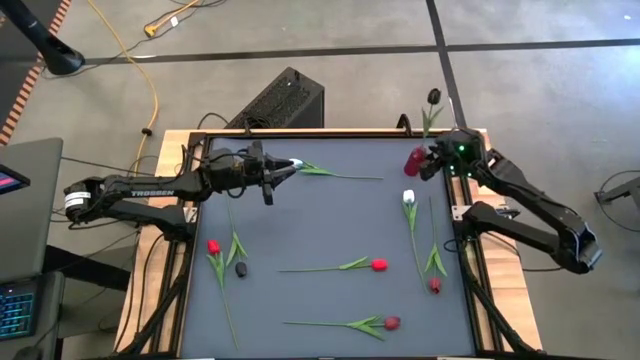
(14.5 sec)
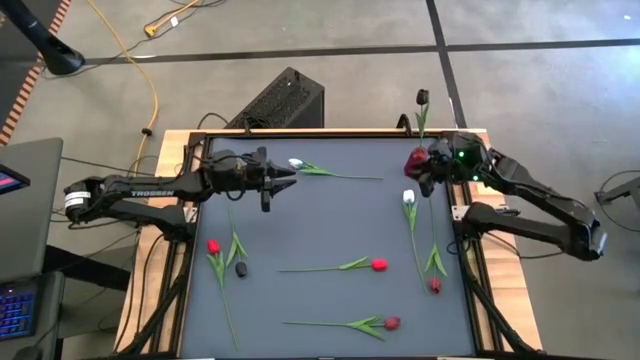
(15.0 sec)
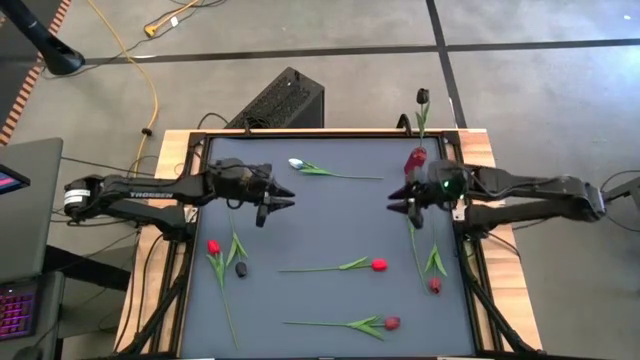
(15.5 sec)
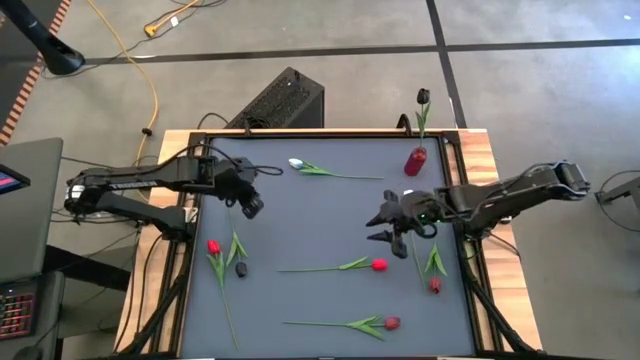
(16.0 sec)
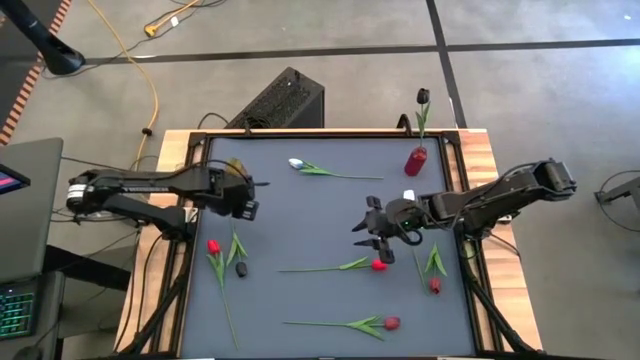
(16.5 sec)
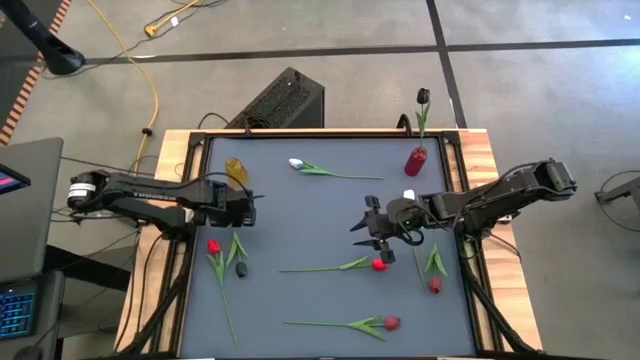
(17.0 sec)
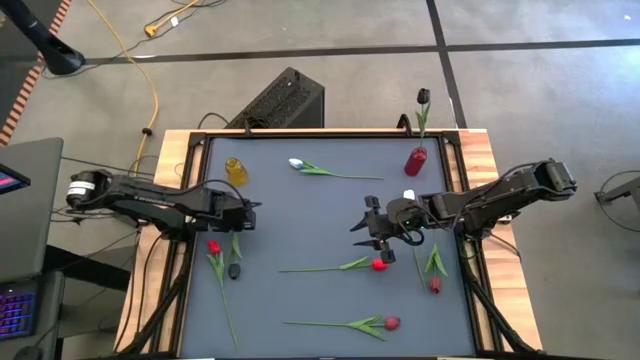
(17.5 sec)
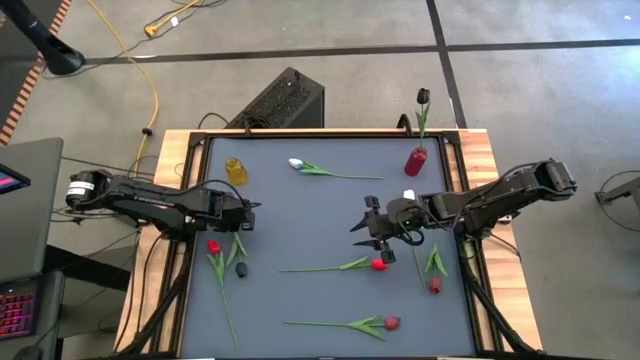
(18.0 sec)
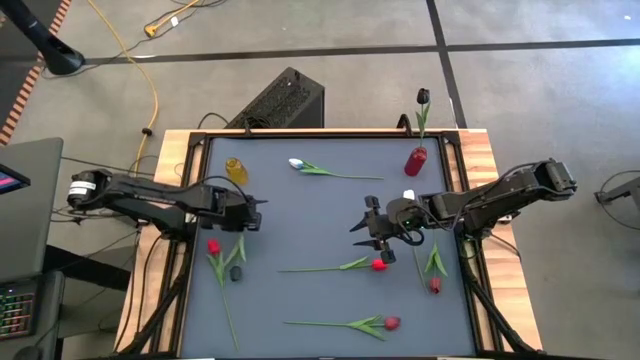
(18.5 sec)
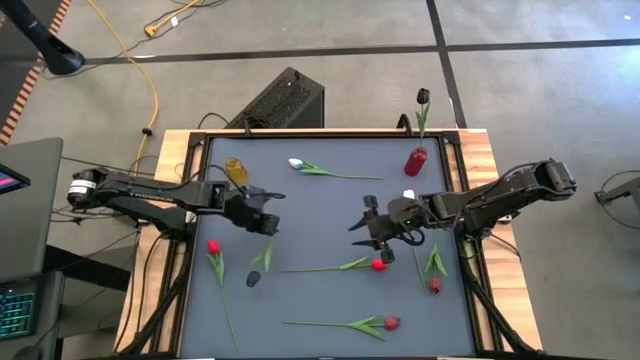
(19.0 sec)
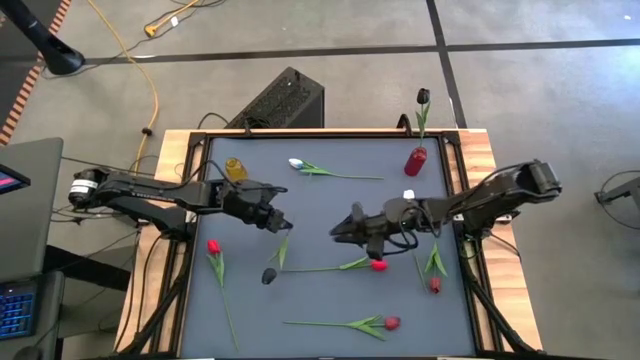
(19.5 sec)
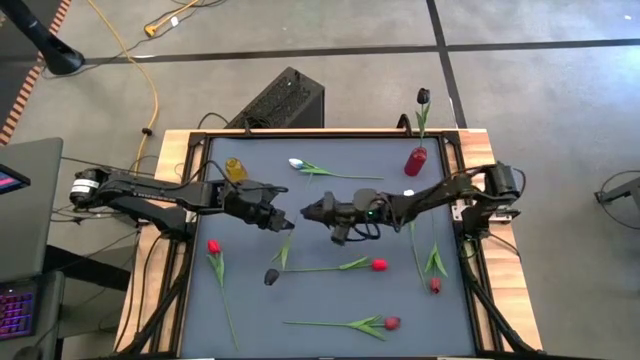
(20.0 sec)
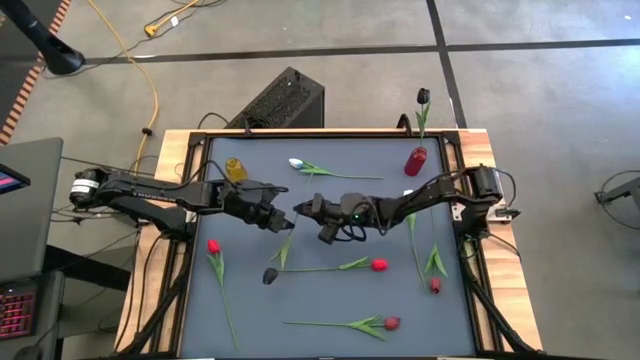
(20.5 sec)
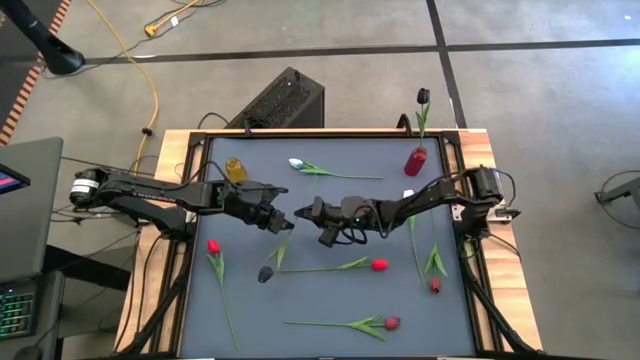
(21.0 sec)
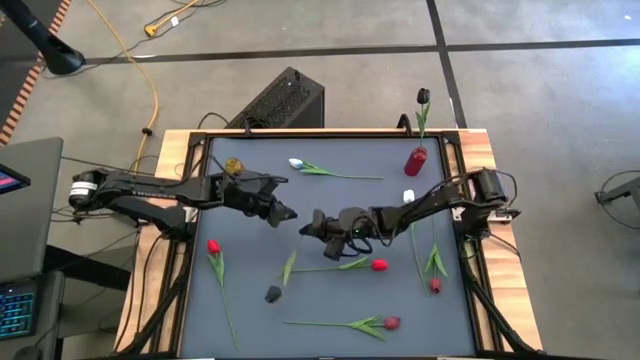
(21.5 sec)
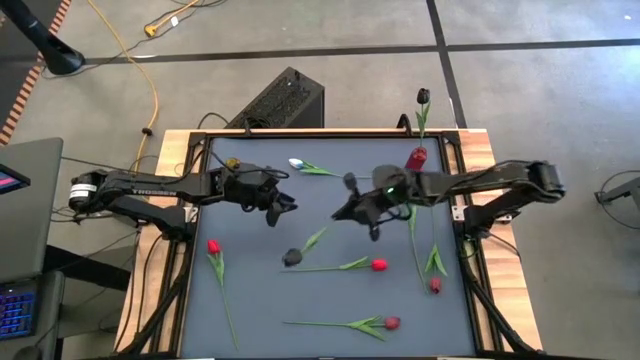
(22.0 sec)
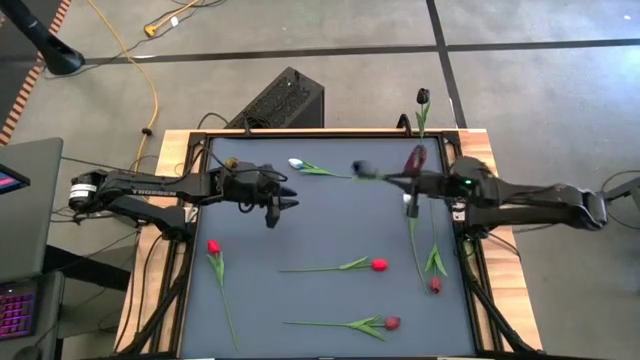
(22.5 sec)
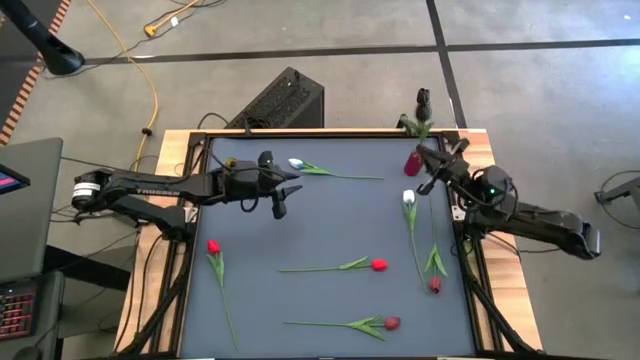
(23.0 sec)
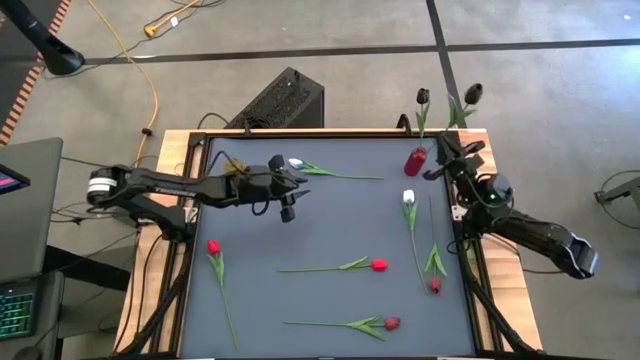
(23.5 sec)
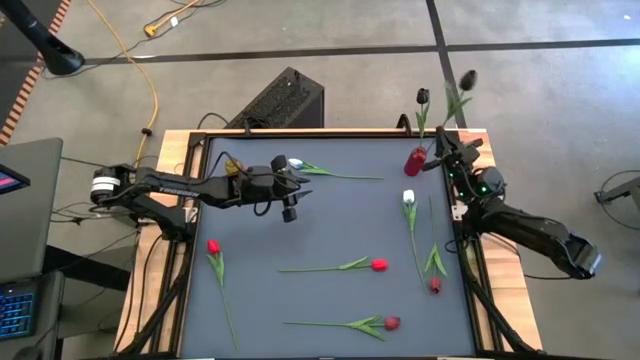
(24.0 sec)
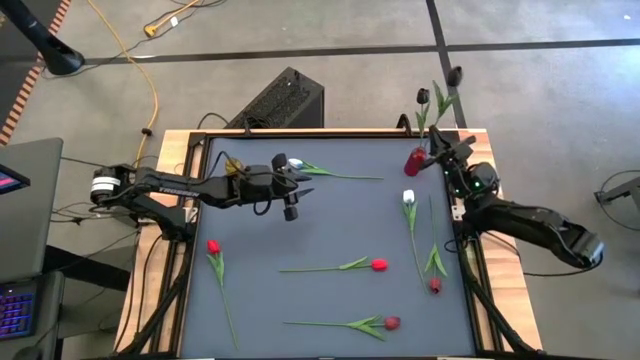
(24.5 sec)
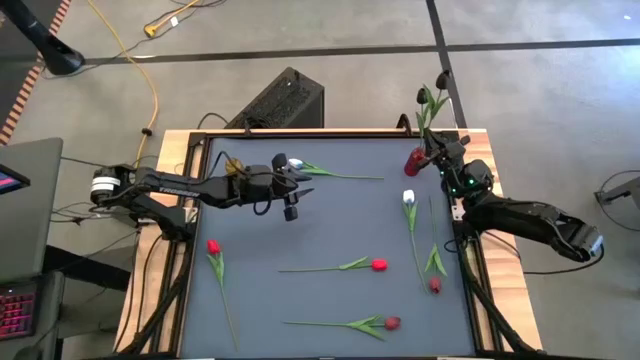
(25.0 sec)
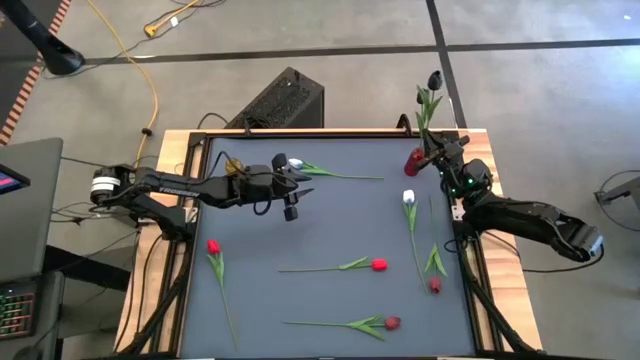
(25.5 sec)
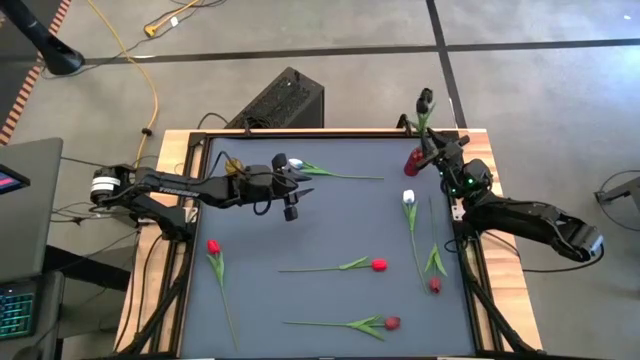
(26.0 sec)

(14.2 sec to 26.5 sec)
Task: Sort flowers into vase by color
Put the black tulip into the red flower vase

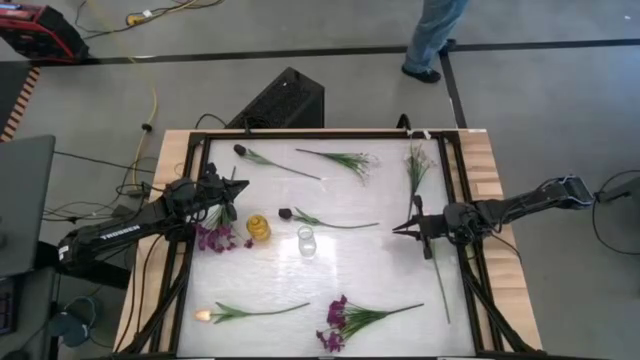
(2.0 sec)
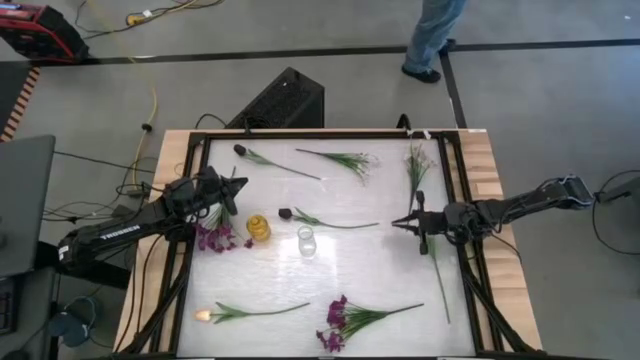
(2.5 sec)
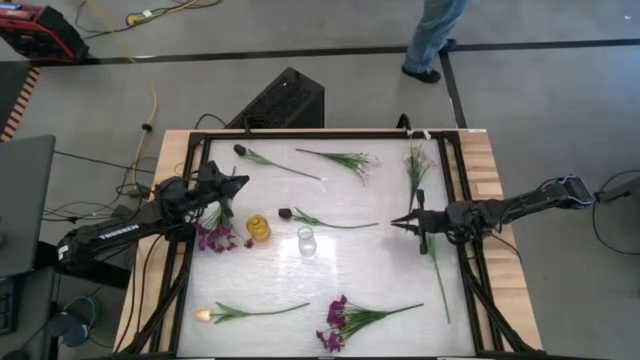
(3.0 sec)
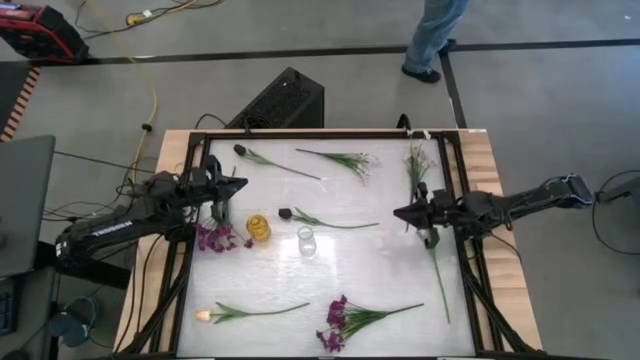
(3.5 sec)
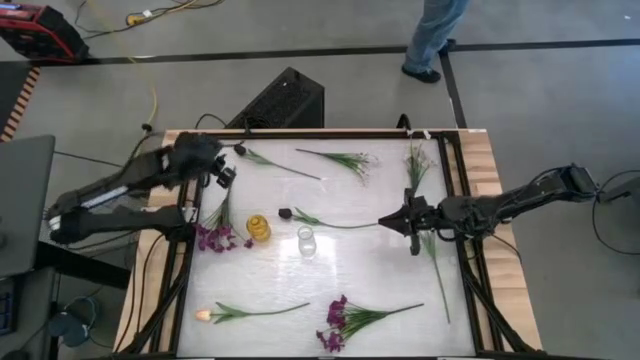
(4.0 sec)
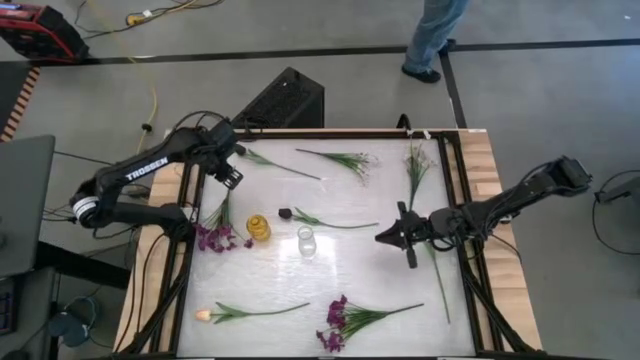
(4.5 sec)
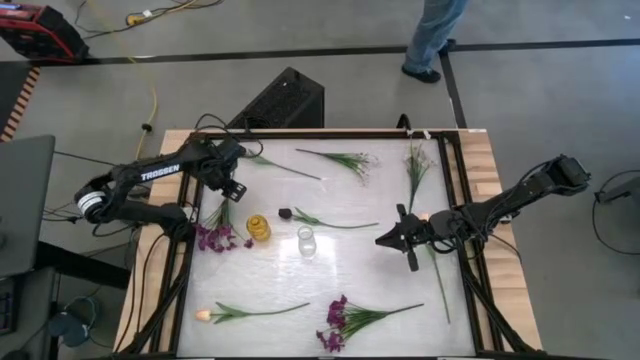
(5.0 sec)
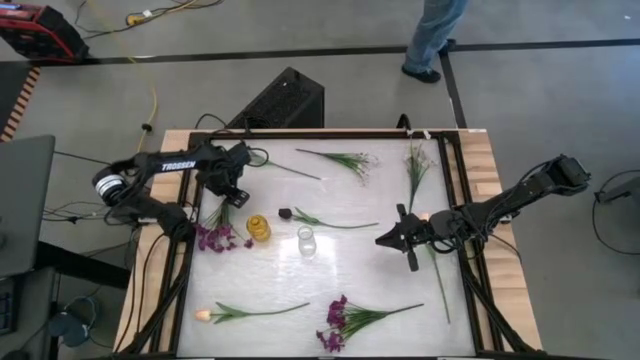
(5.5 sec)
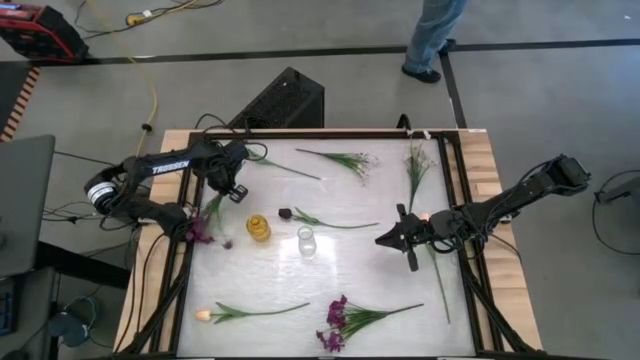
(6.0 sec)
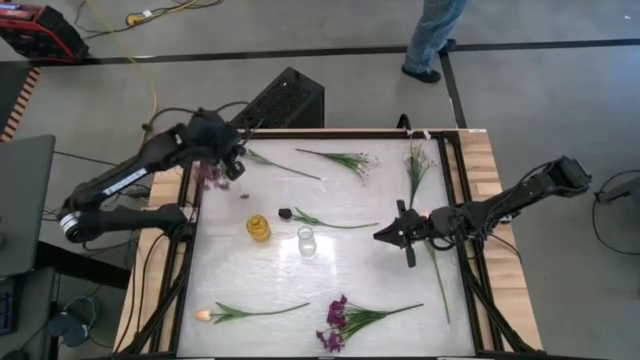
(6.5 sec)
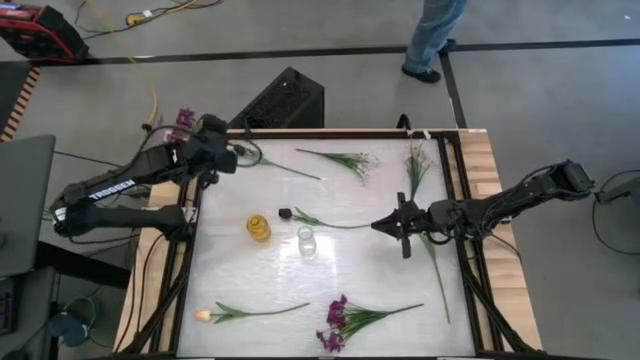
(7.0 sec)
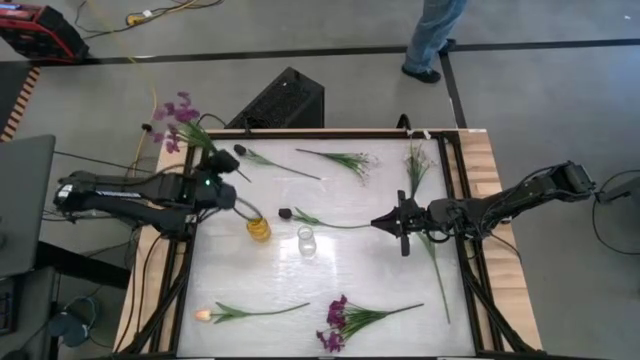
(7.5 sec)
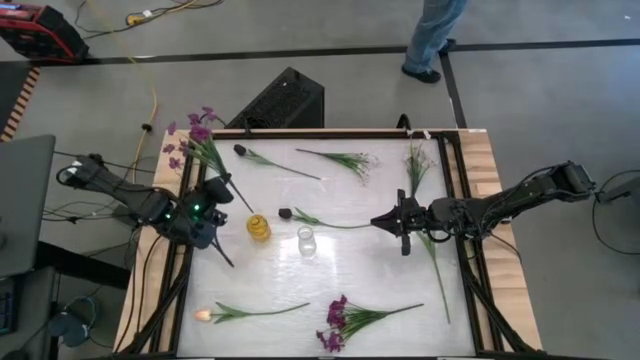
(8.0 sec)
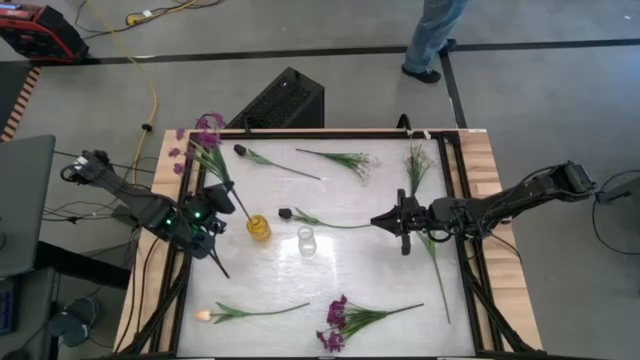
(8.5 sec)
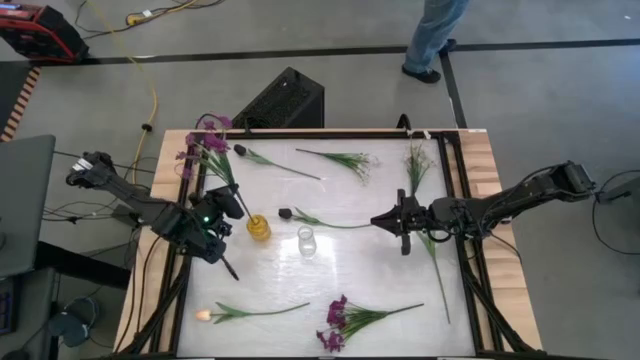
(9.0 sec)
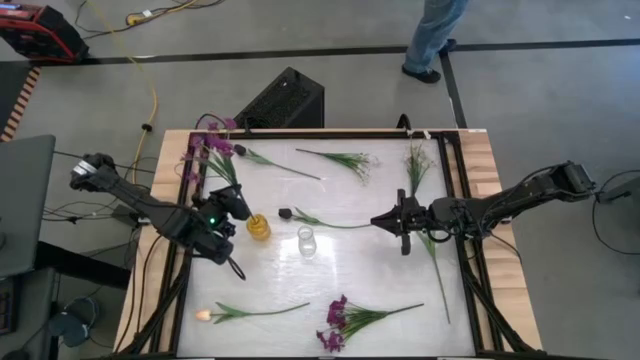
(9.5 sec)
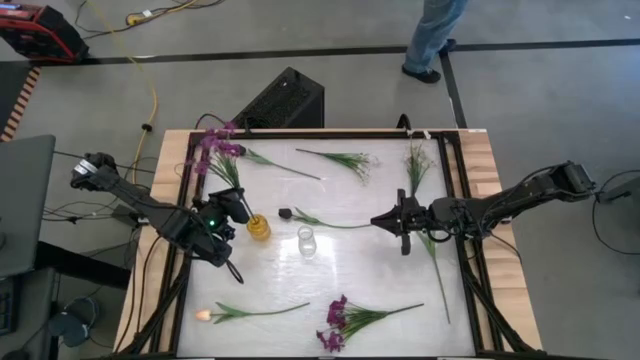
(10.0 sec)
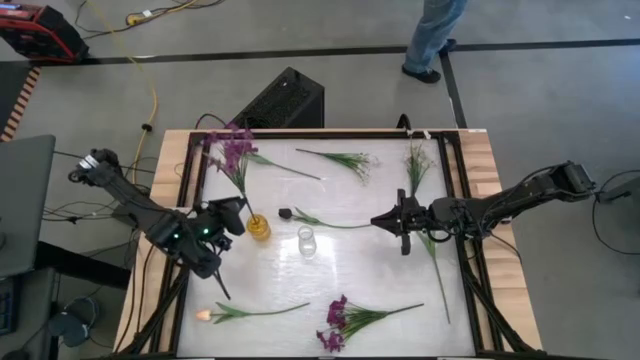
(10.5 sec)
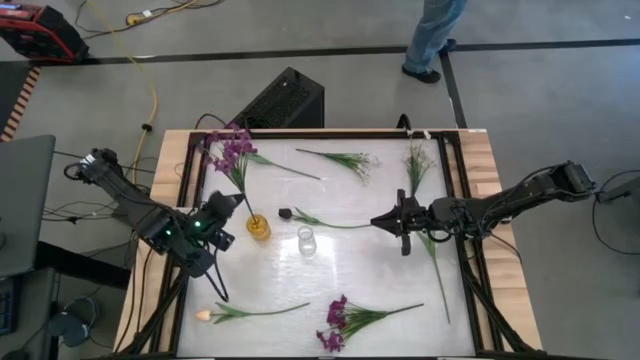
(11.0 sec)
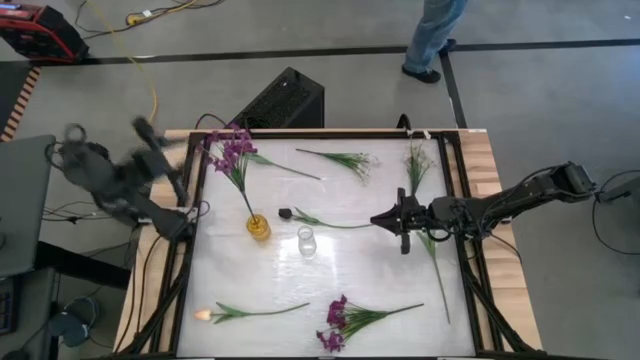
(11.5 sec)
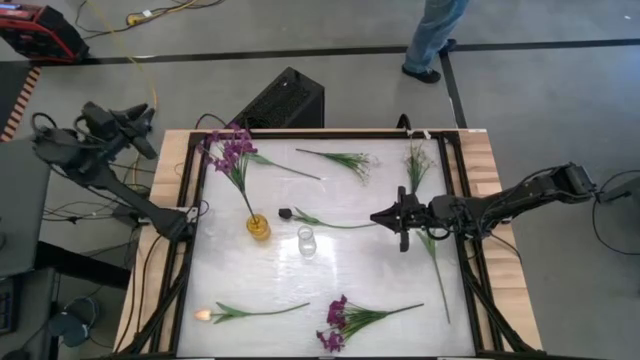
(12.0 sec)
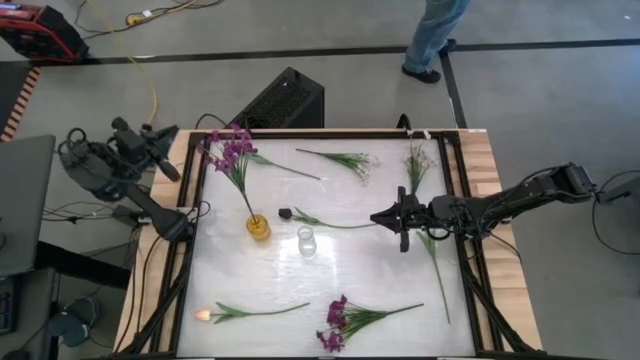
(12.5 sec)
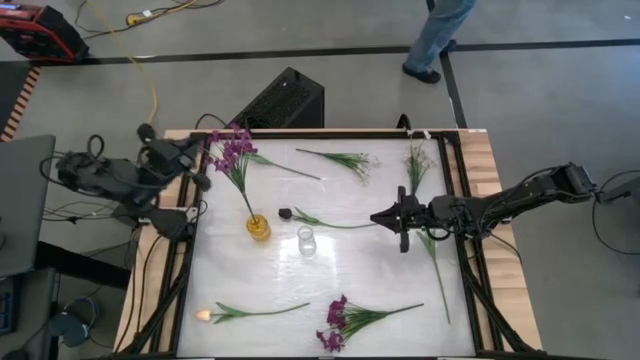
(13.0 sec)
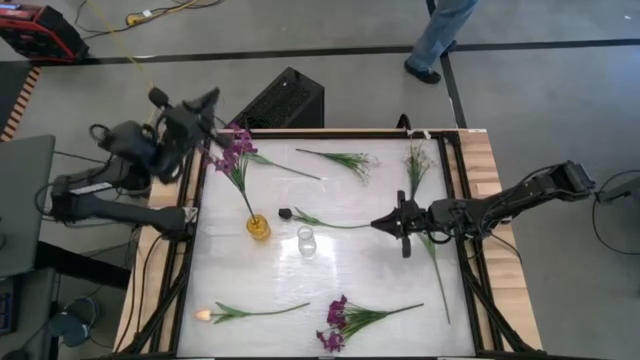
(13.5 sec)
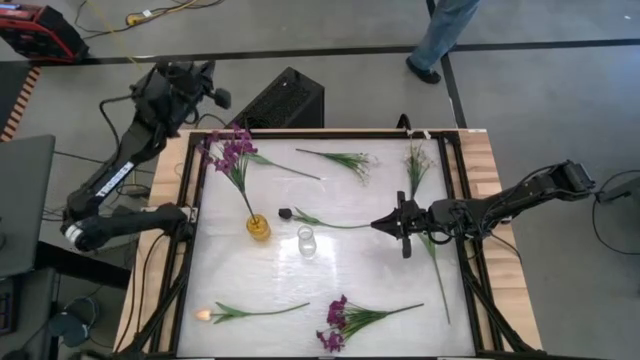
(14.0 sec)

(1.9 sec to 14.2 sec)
Task: Sort flowers into vase by color
Put the top purple flower into the yellow vase
